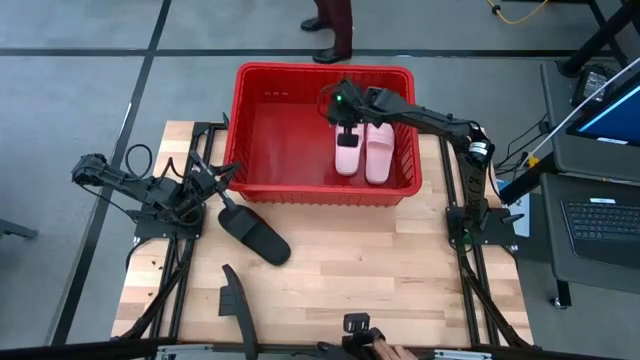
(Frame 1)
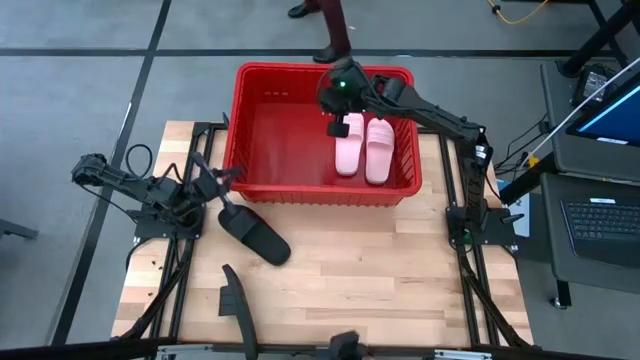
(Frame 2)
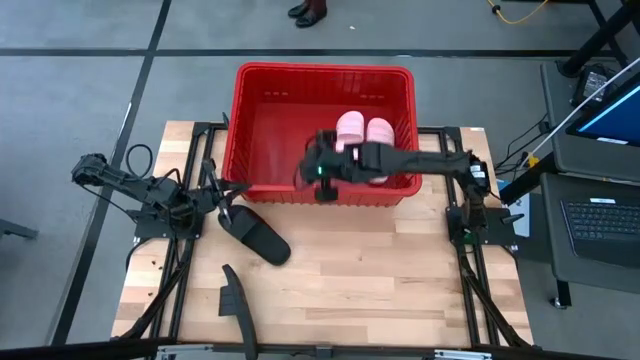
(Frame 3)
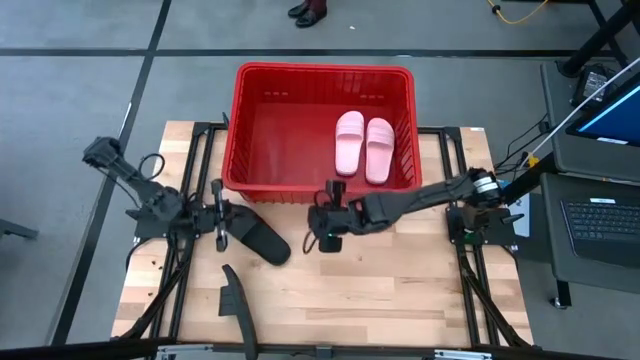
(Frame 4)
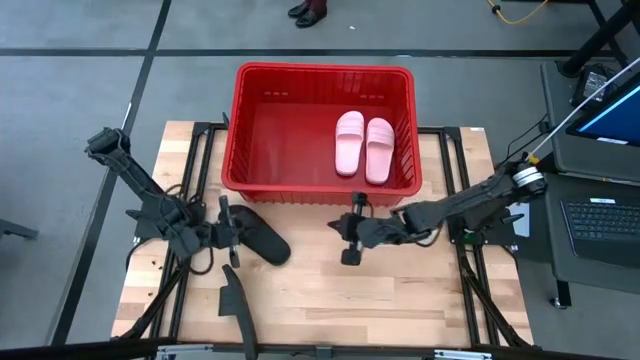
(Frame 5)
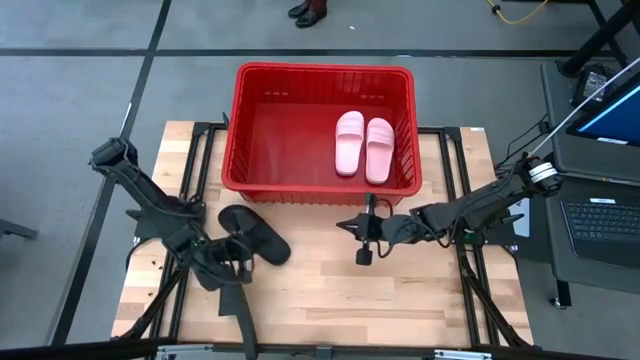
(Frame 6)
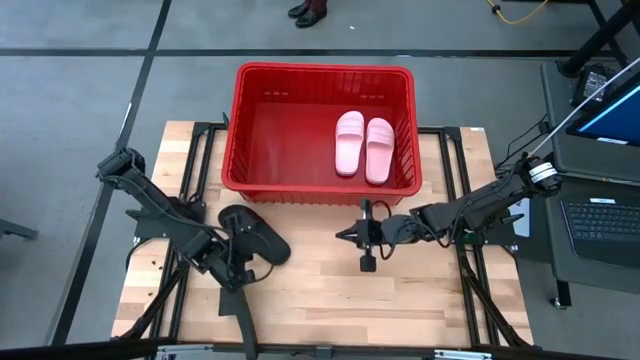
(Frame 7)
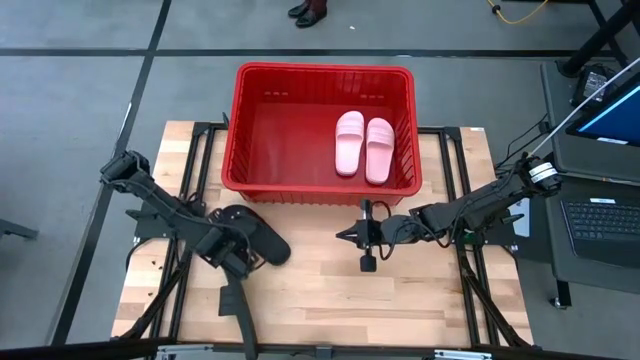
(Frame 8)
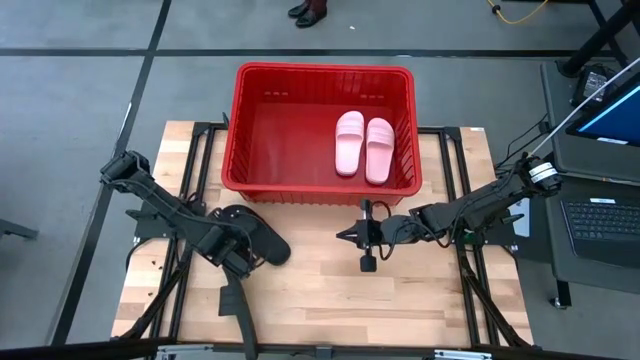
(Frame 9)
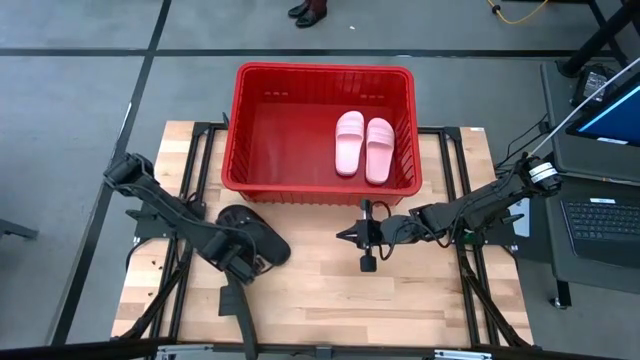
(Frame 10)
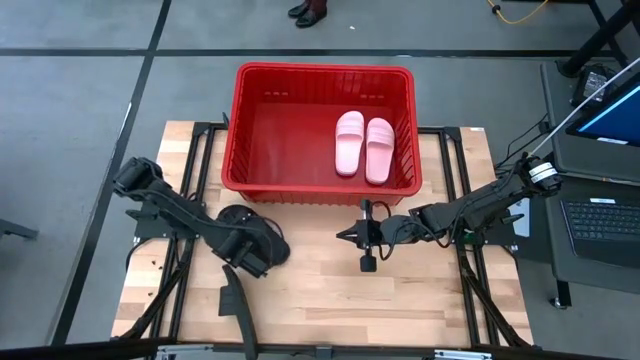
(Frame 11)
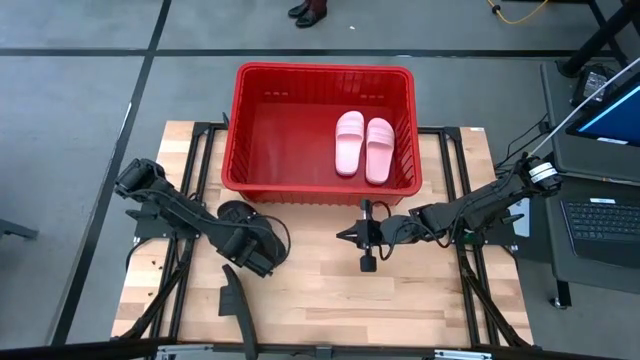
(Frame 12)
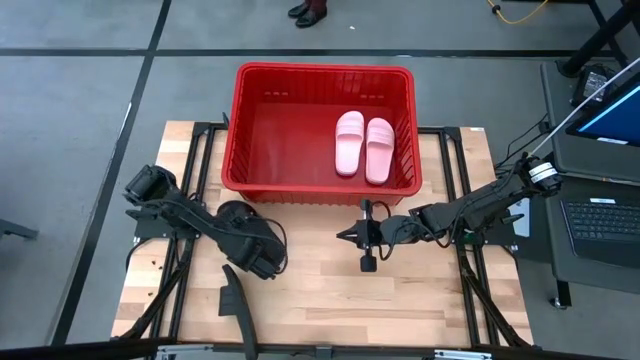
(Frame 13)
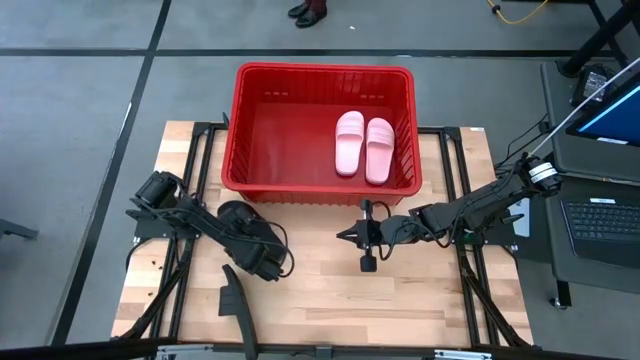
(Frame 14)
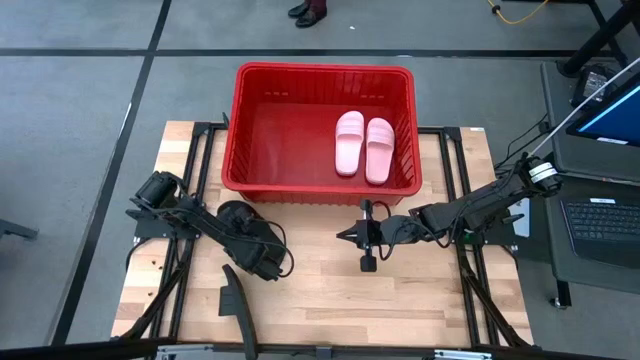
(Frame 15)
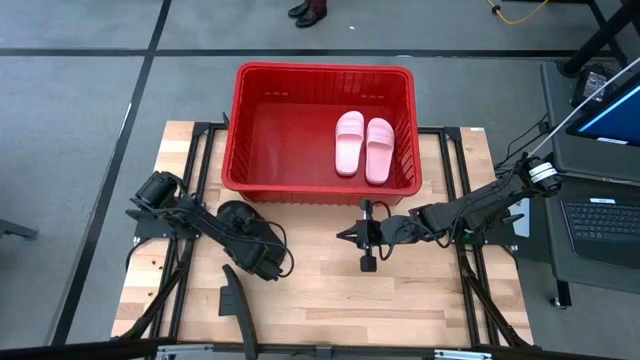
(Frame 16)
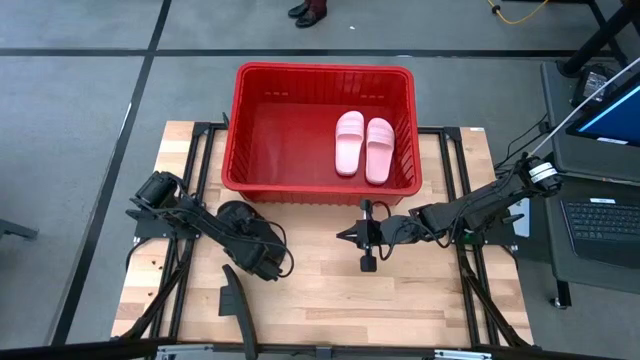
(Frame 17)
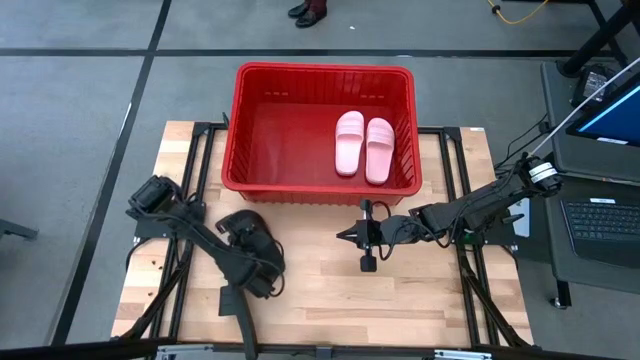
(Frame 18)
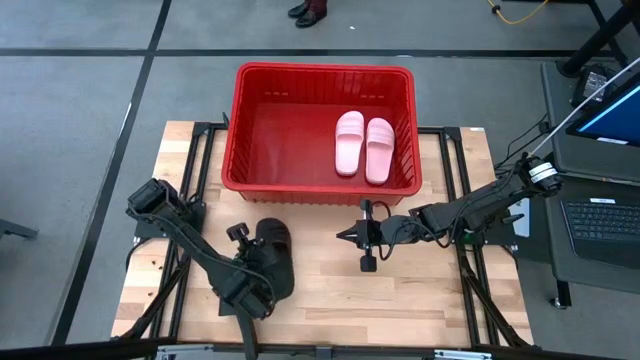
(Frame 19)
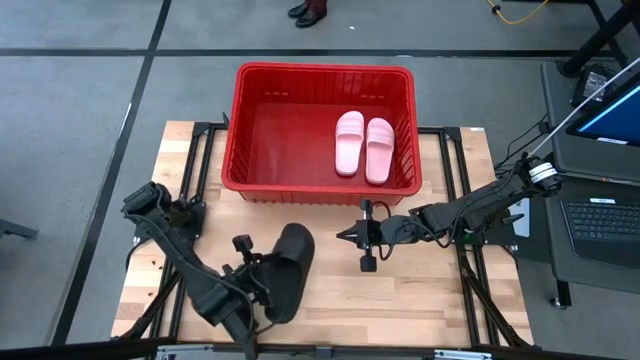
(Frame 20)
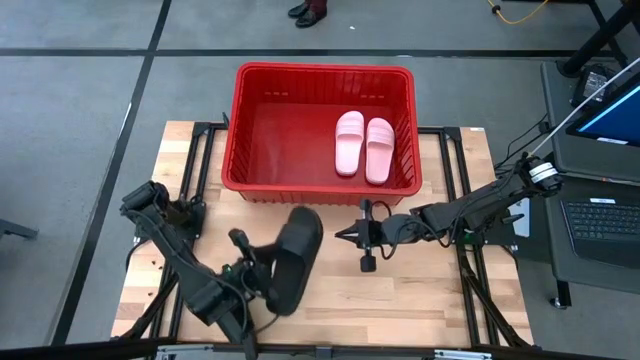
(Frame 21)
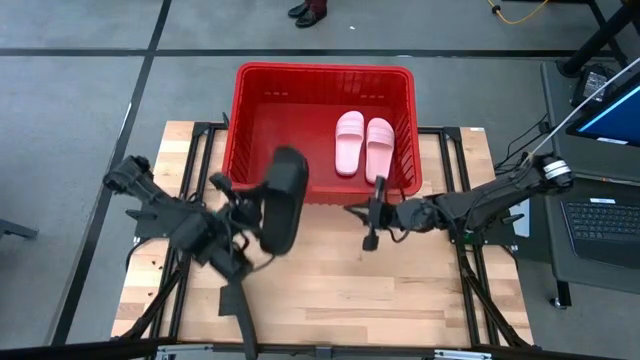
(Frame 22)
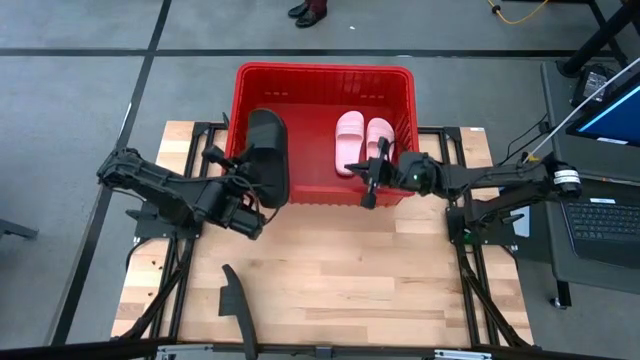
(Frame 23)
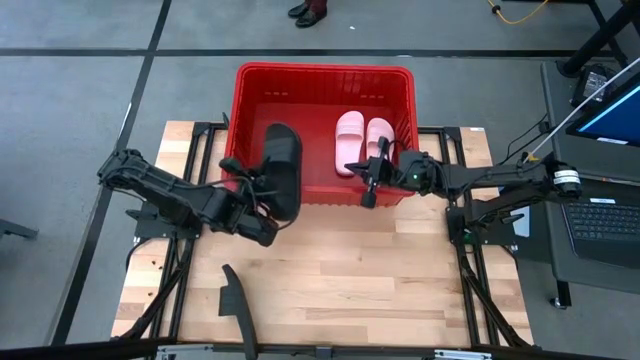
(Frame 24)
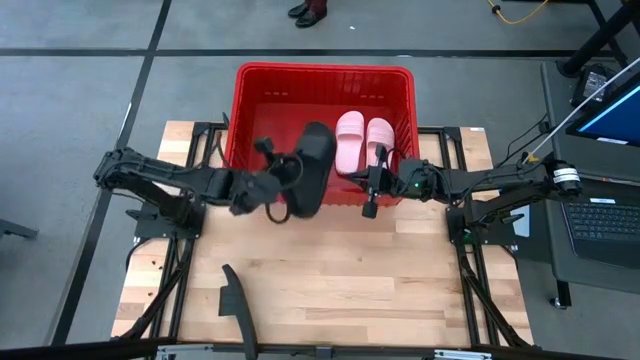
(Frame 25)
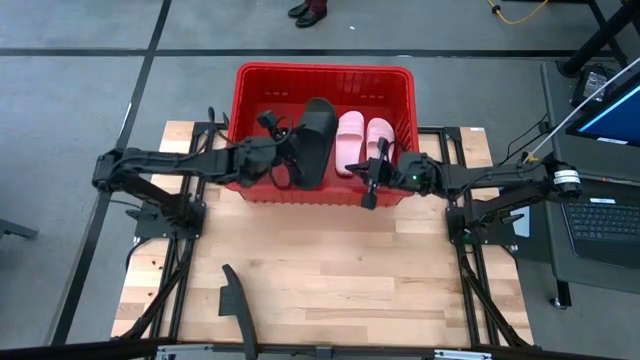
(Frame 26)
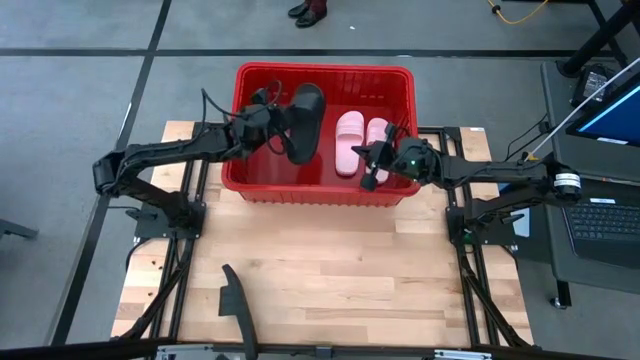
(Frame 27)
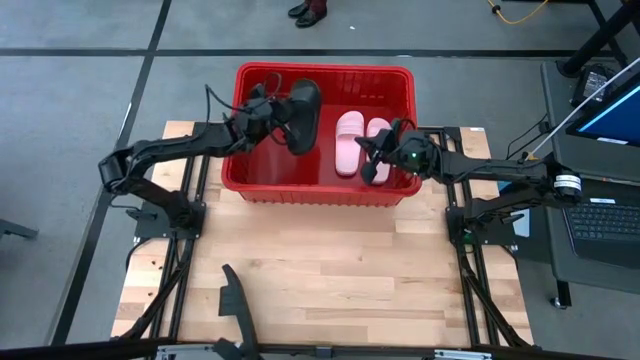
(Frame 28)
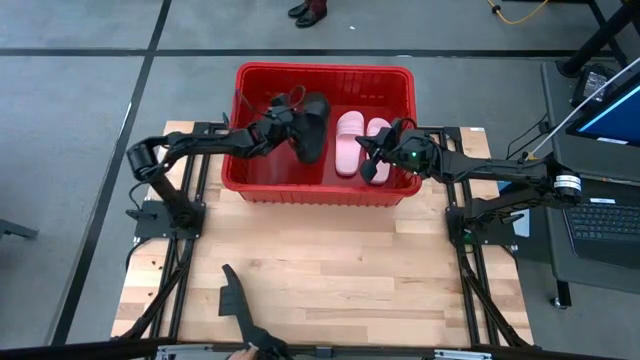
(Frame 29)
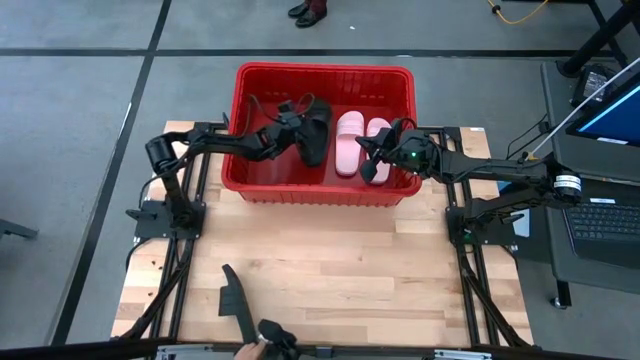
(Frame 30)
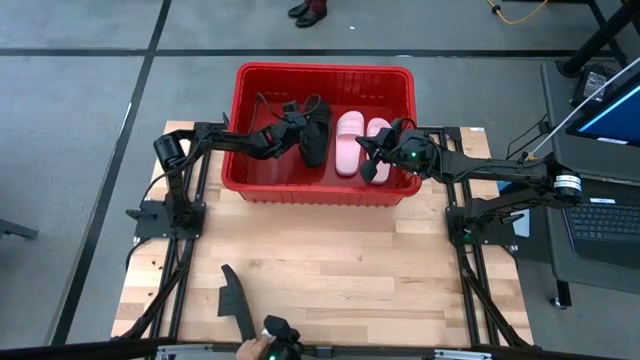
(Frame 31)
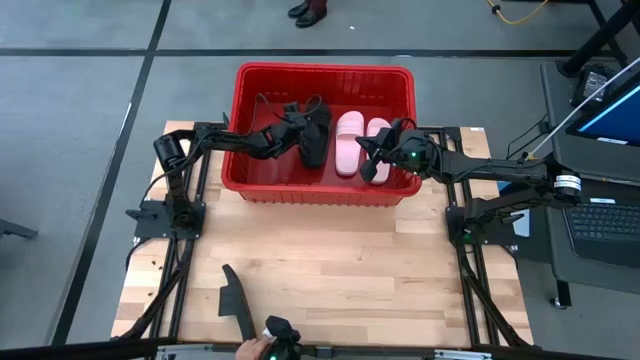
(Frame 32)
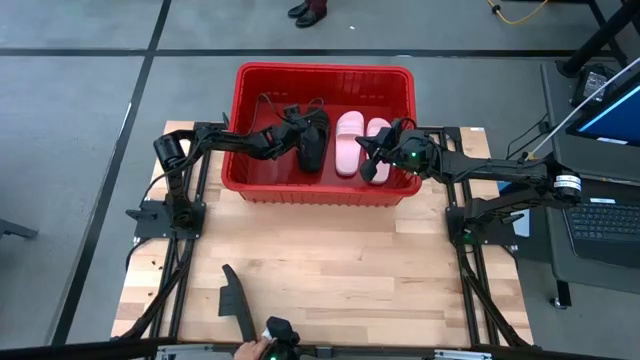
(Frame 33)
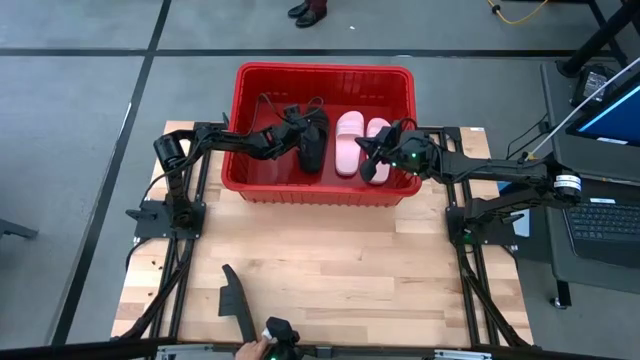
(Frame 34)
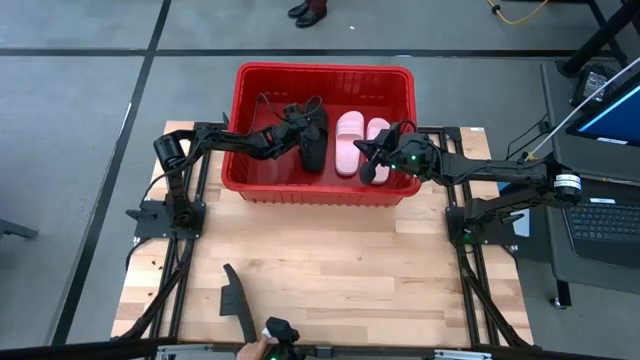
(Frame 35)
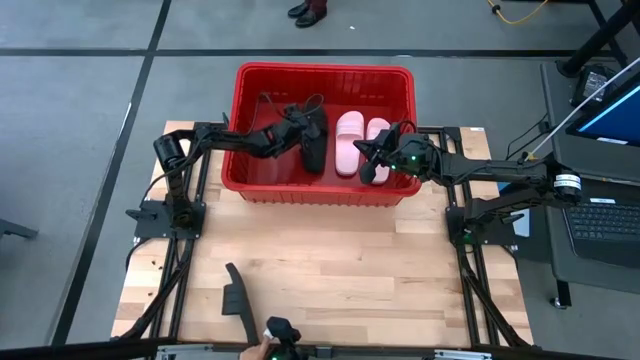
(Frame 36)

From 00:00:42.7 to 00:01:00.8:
Task: Pick and place slides into bin
Put the top black slide into the red container

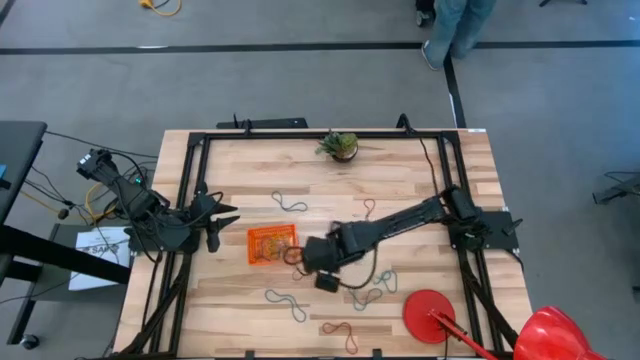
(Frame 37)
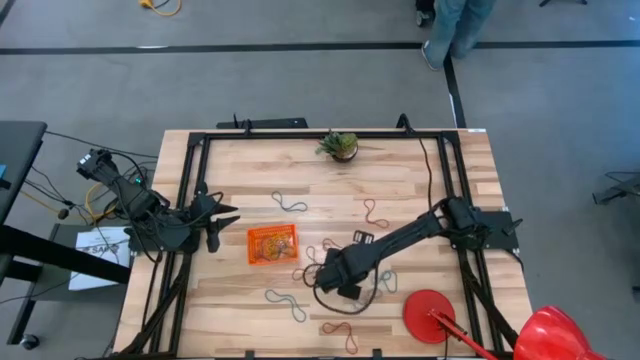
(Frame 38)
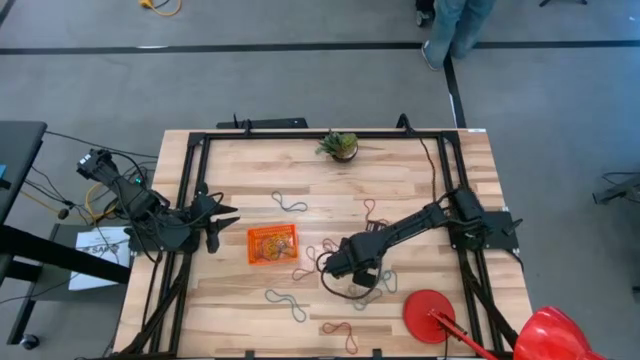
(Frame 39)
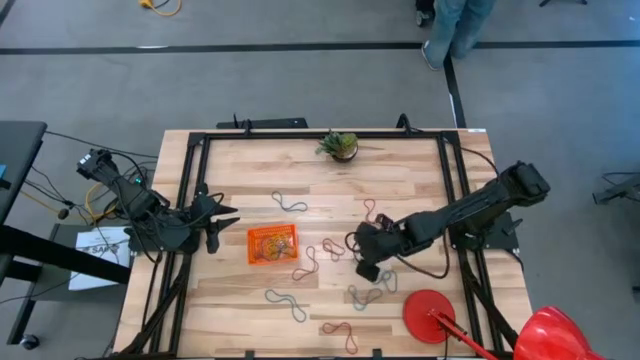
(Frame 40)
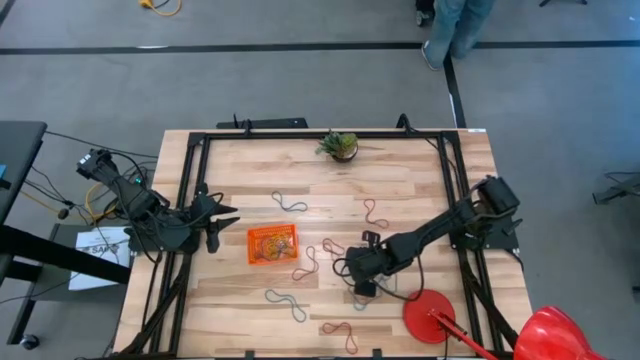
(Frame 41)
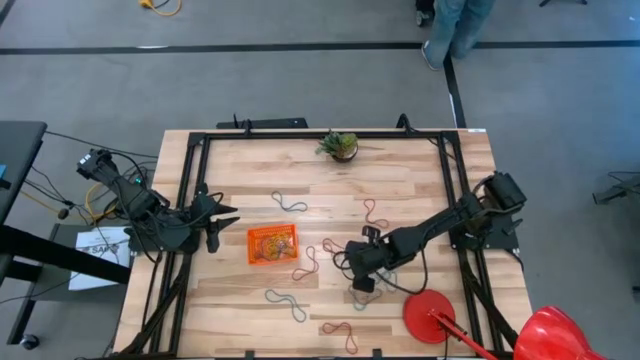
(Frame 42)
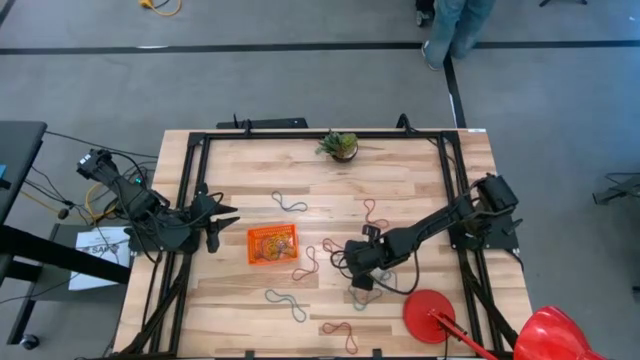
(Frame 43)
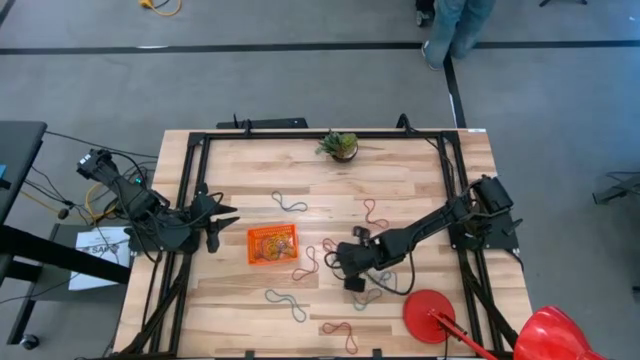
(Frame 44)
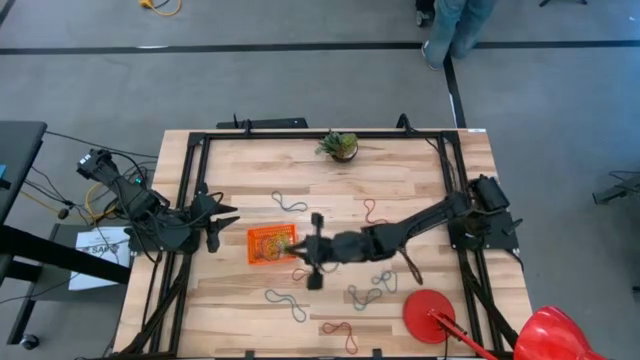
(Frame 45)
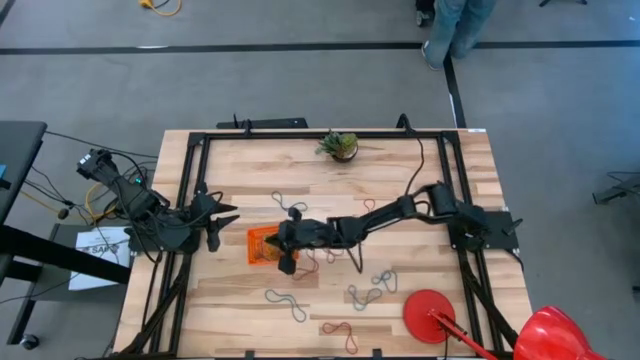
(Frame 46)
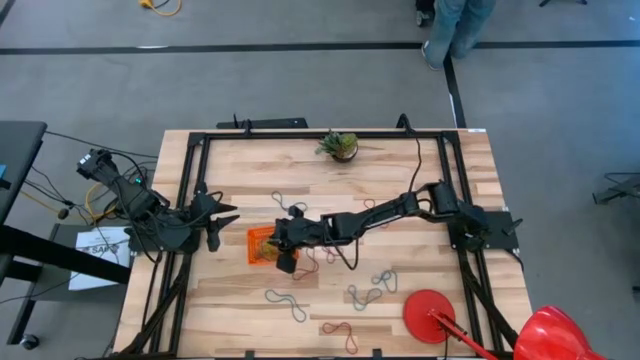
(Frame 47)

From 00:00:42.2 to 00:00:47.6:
Task: Pick and place rubber bands into bin
Put the green rubber band into the orange container
